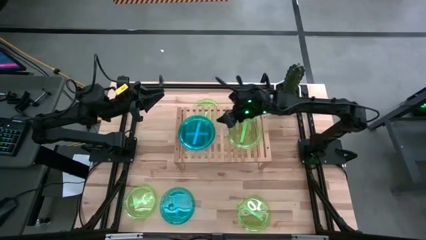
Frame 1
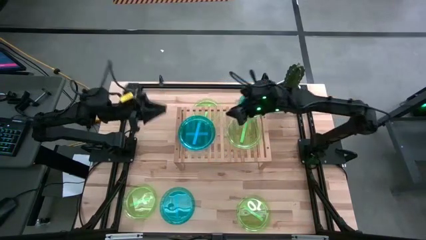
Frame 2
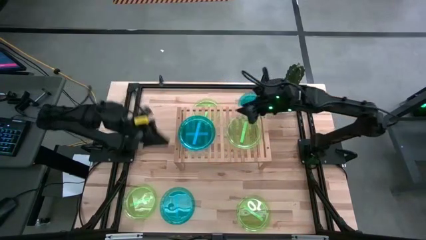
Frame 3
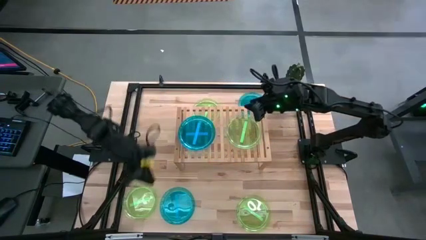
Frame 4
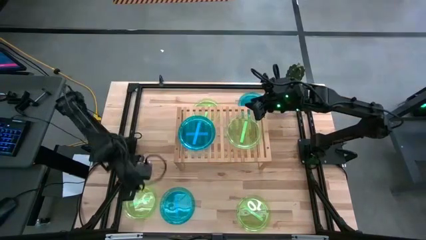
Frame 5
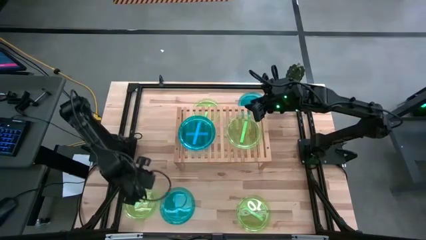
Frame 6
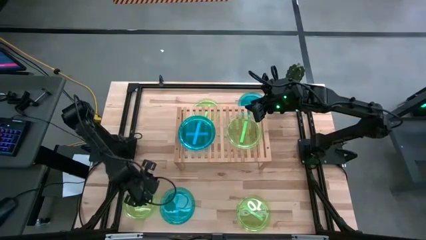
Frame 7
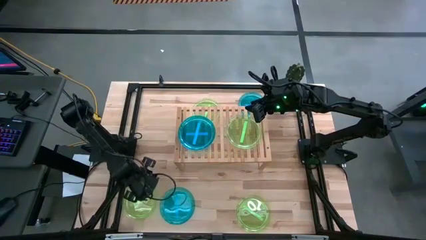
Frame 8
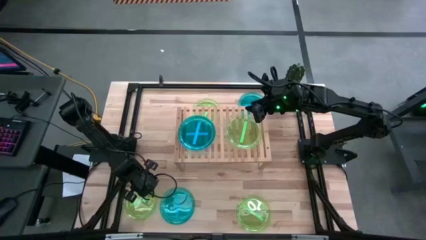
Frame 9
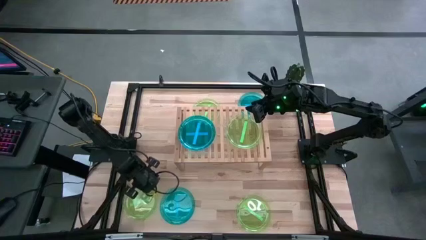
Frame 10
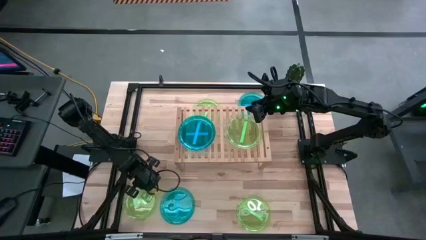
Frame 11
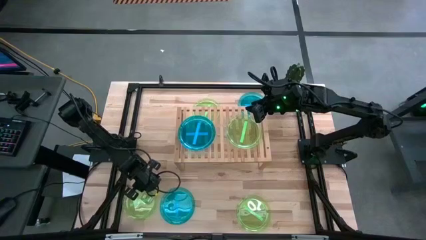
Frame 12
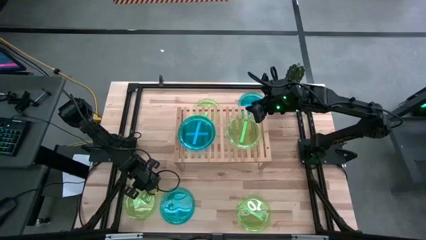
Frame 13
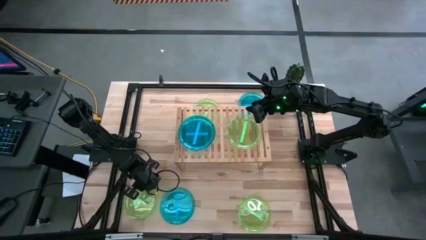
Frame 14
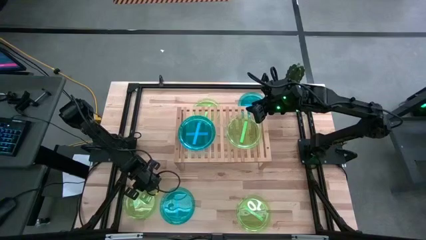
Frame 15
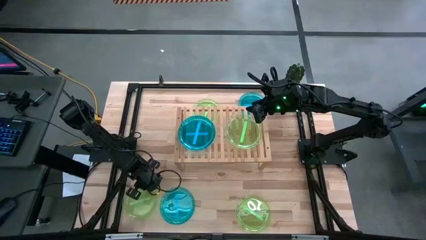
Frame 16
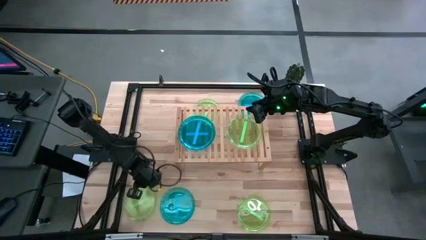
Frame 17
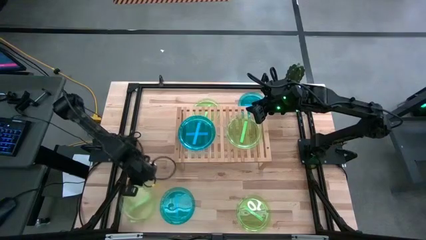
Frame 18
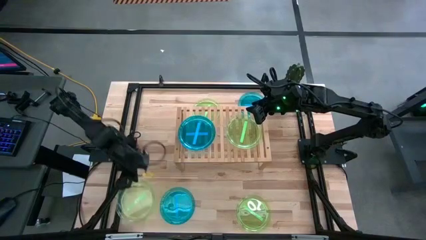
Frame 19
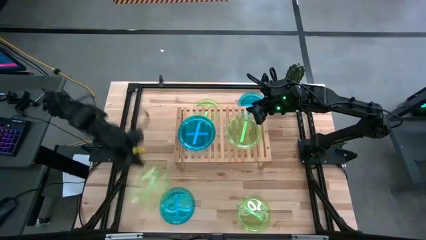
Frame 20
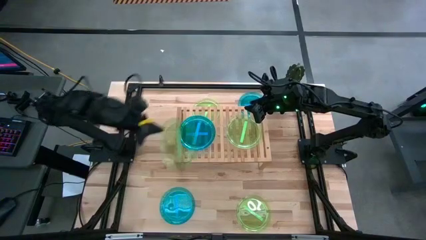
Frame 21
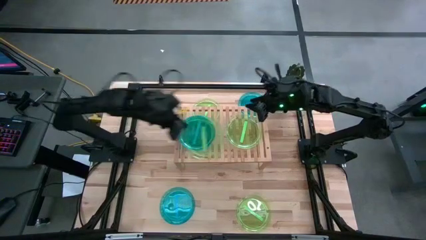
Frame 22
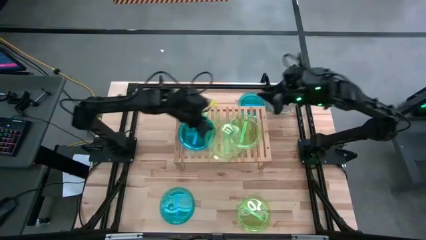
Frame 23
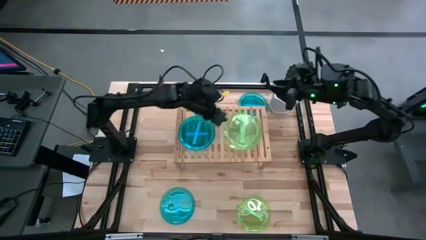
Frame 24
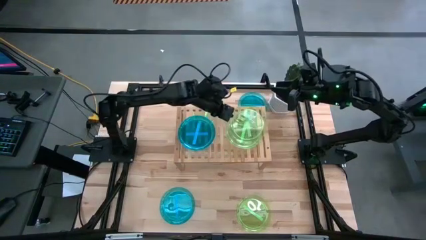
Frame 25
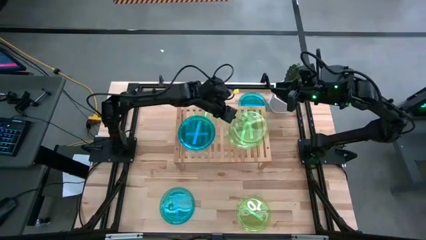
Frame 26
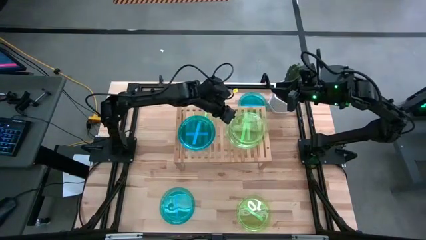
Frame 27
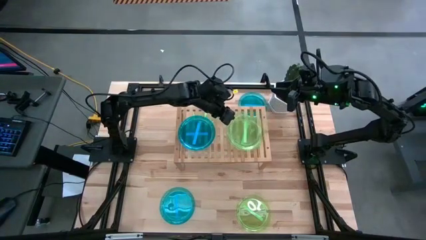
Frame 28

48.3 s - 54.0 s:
Task: Place and stack plates onto a shelf
Stack the green plate on top of the other green plate on the shelf

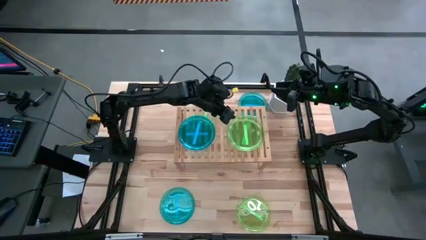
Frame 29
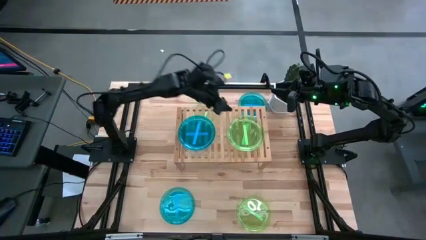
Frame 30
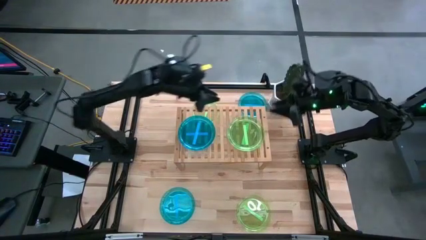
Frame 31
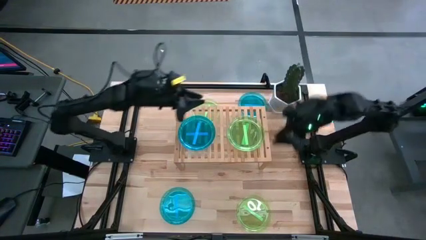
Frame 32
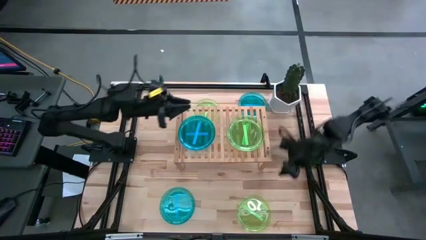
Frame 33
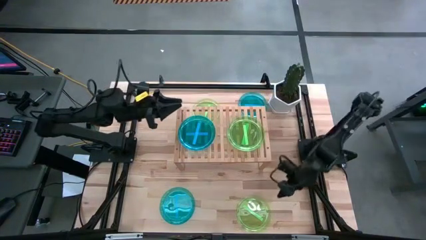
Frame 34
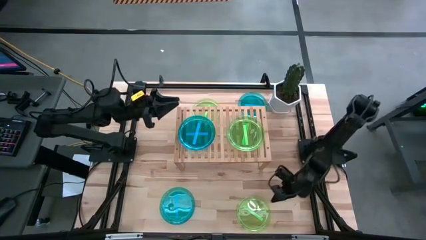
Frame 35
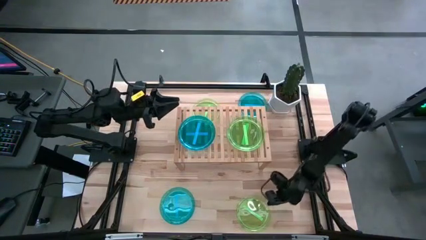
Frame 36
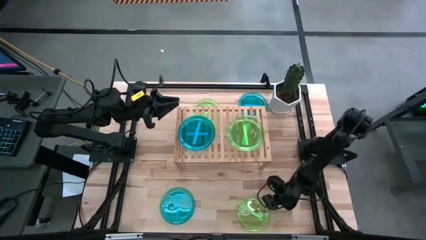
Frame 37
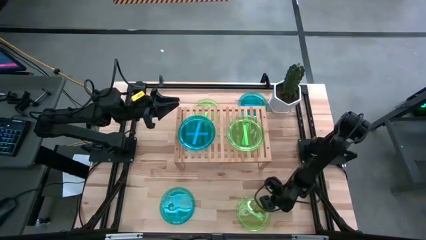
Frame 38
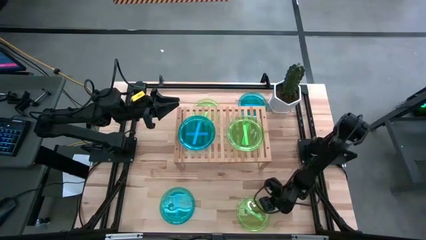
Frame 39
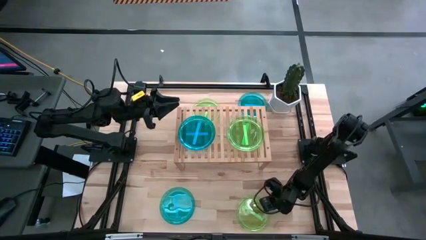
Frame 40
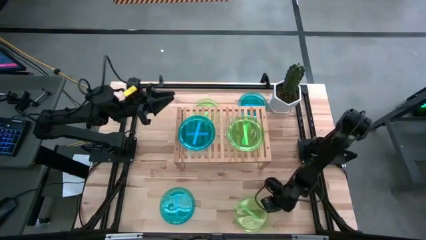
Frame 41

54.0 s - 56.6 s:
Stack the green plate on top of the other green plate on the shelf

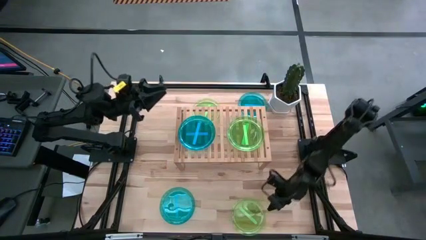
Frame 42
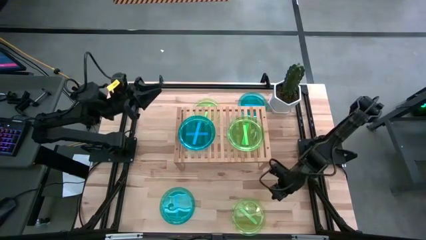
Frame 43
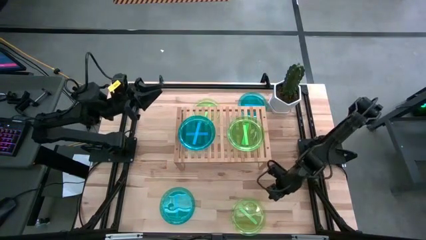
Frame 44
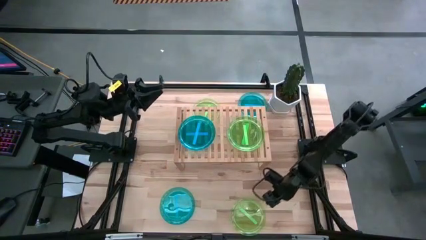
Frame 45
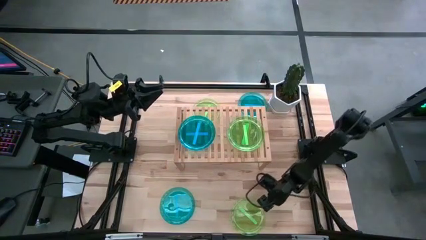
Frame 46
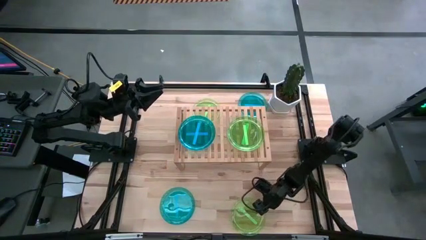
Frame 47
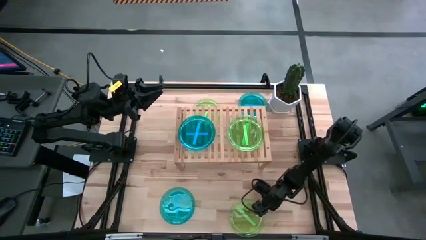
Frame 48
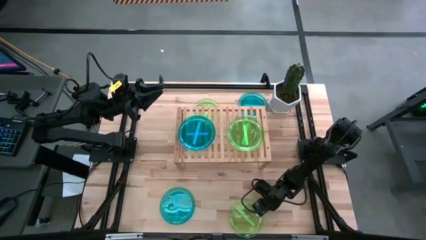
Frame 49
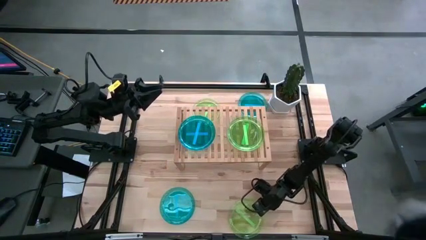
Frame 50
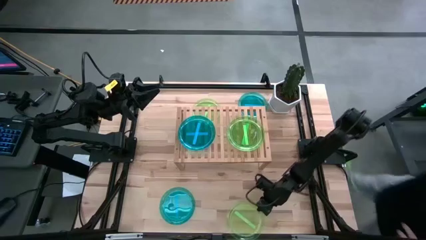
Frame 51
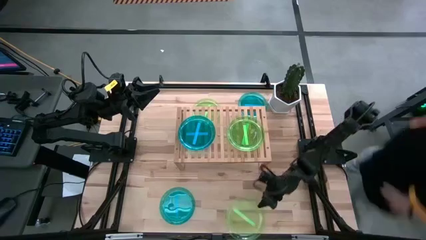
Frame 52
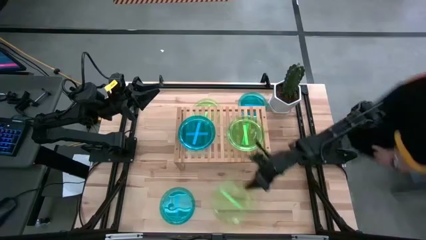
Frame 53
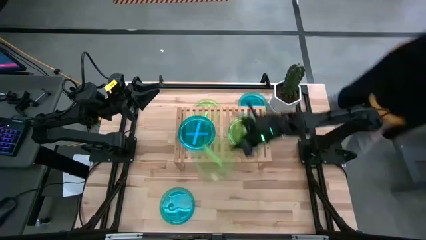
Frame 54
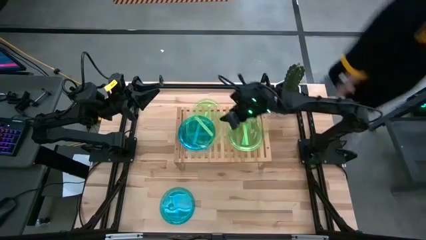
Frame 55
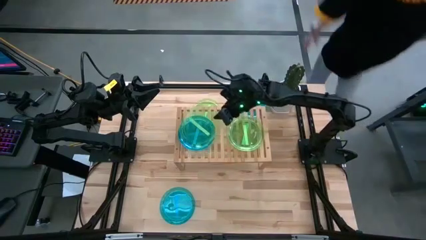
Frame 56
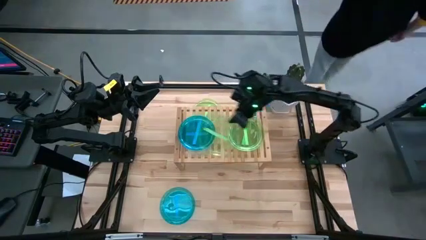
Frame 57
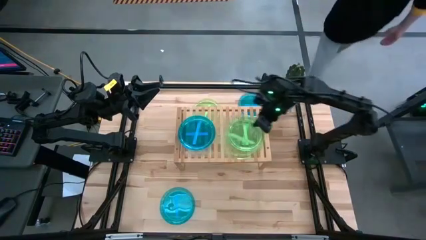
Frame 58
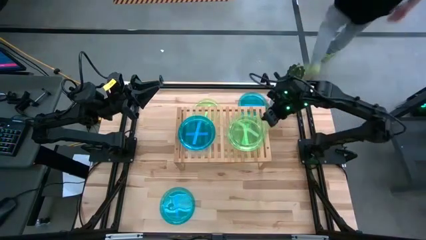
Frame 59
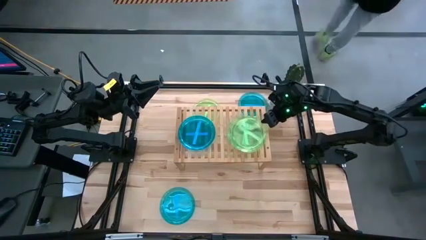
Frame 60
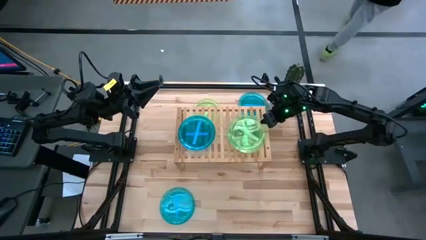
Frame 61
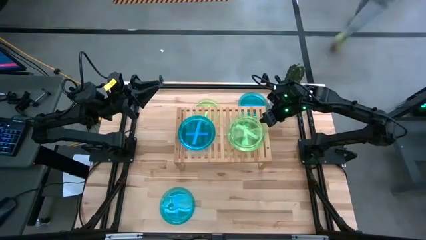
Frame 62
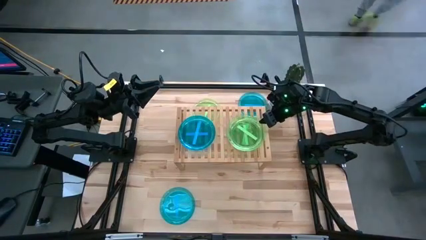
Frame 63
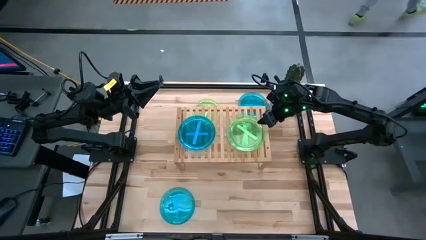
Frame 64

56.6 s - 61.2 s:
Stack the green plate on top of the other green plate on the shelf

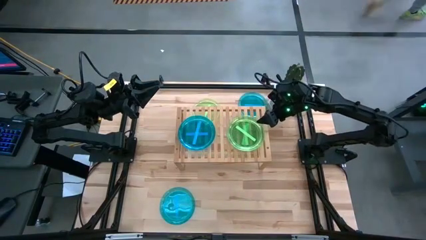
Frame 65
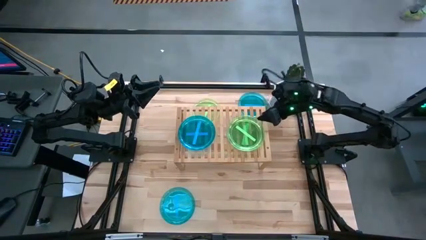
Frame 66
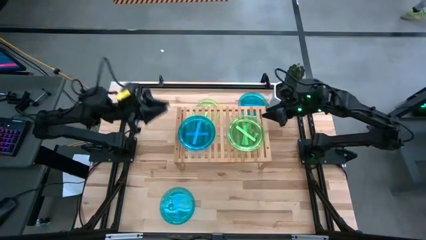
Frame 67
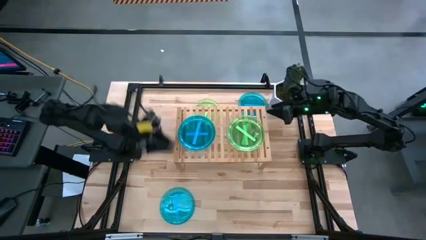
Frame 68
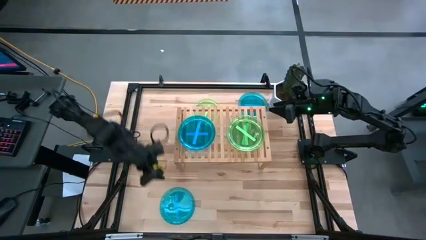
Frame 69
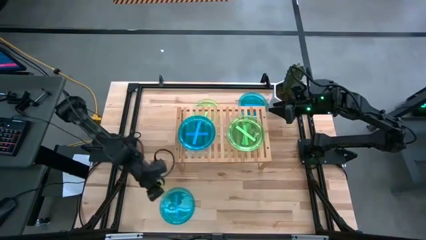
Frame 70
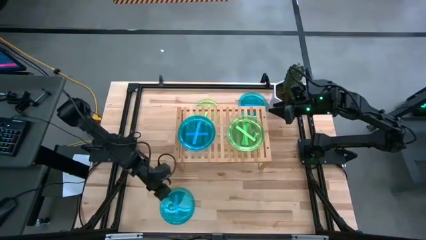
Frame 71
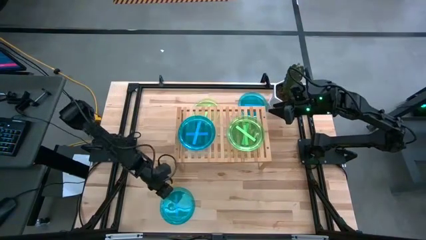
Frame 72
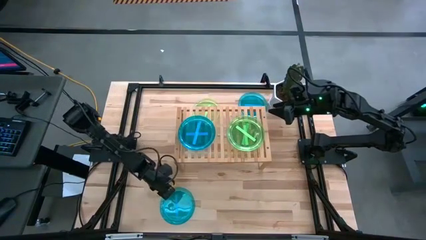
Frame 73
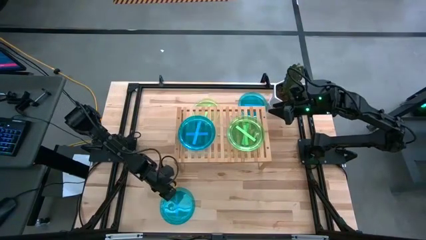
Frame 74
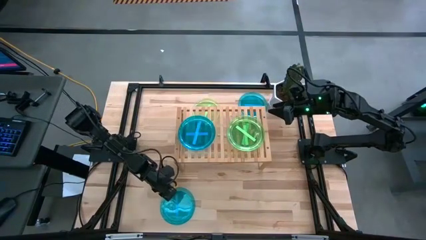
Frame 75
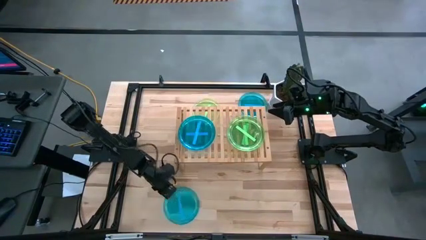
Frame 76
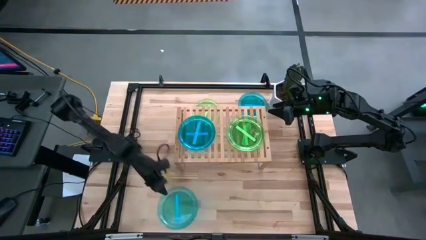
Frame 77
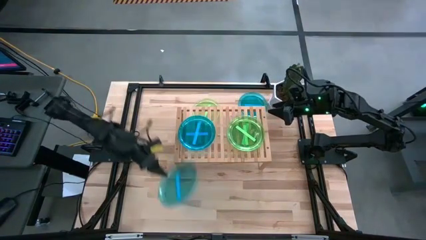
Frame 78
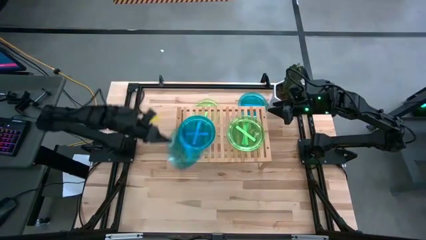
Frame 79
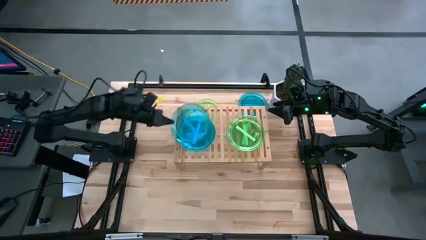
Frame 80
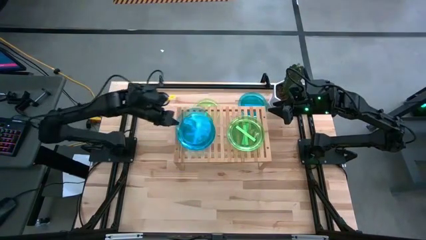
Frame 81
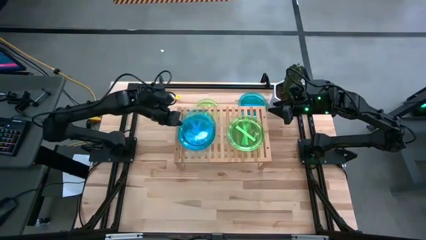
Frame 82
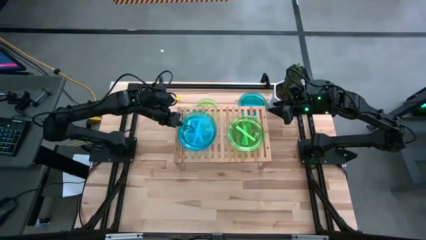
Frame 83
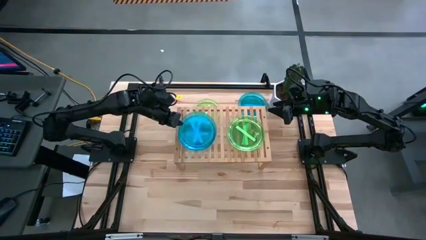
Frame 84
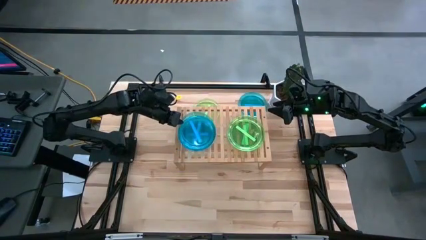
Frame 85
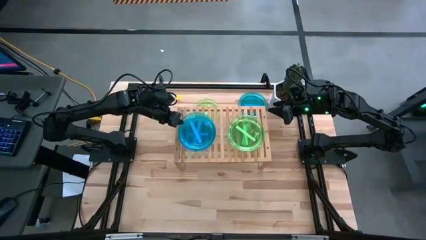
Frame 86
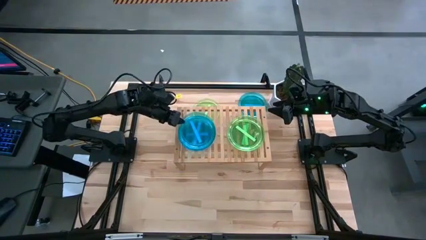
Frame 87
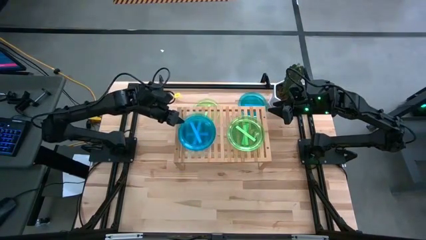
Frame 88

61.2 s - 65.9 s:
Stack the blue plate on top of the other blue plate on the shelf
